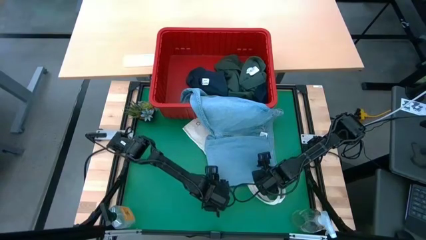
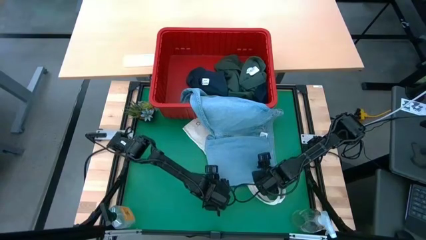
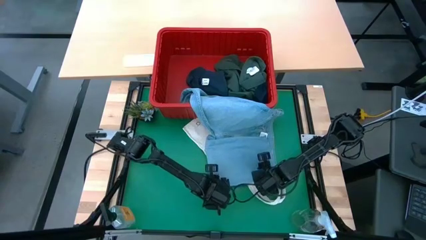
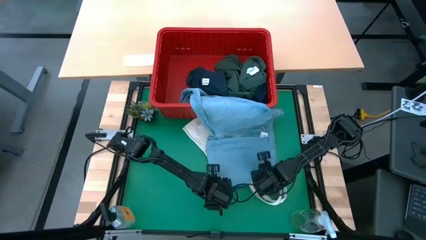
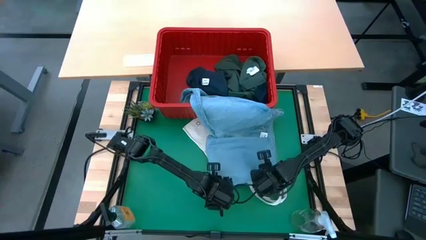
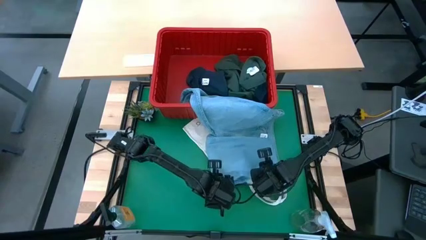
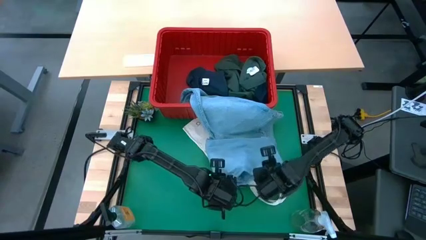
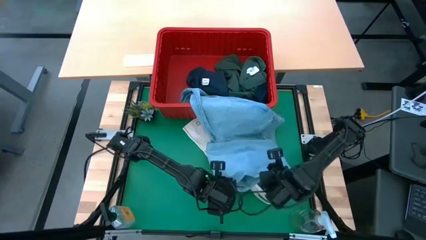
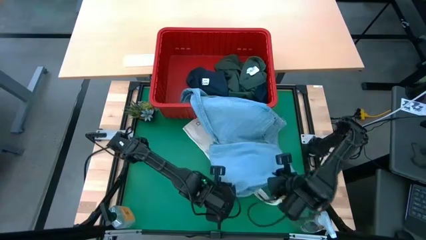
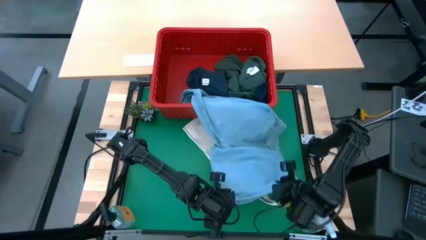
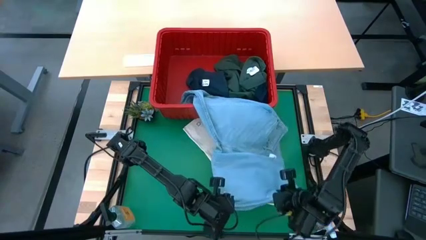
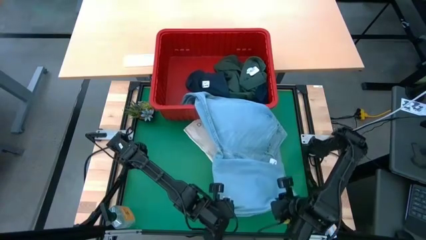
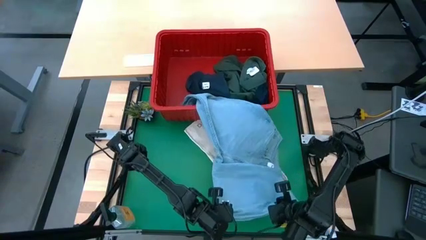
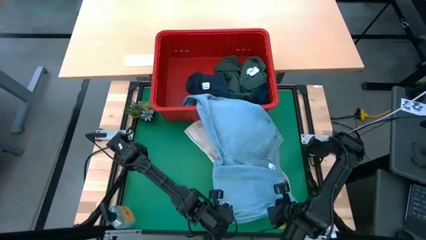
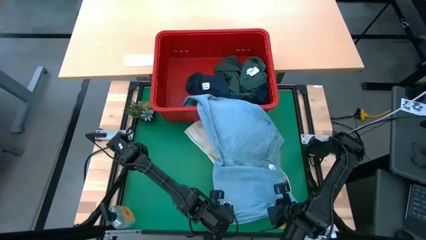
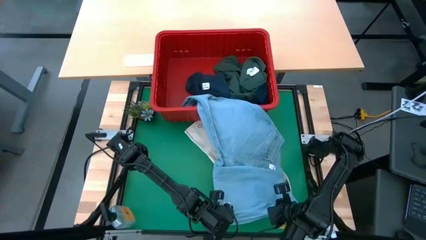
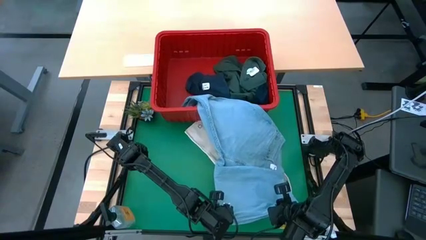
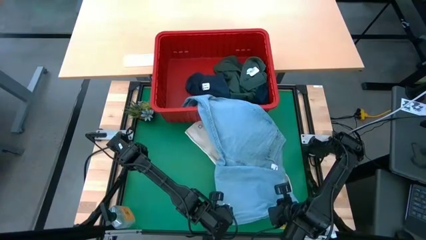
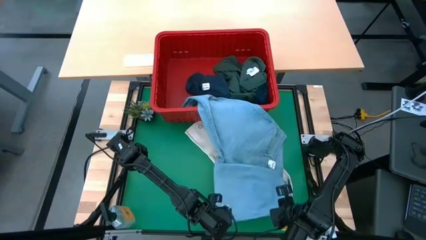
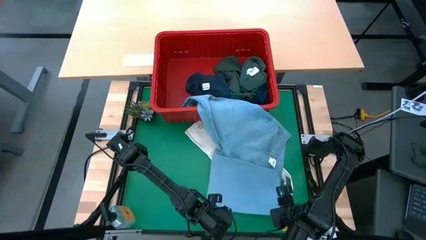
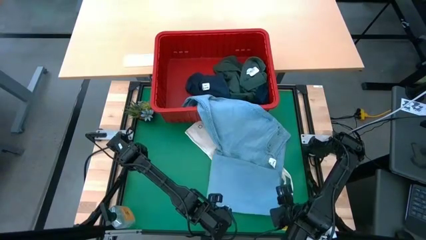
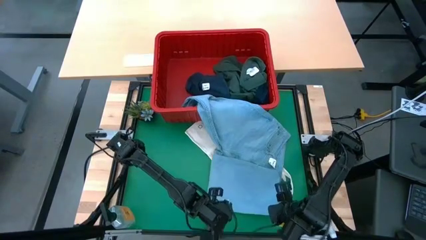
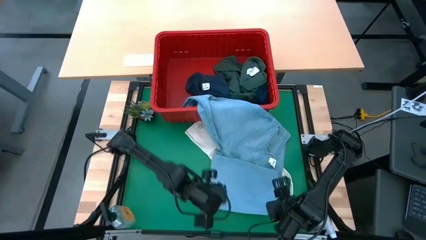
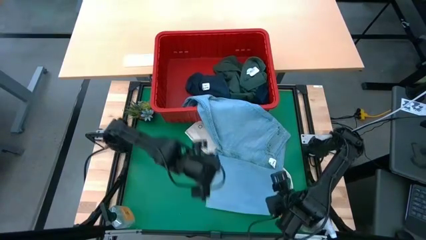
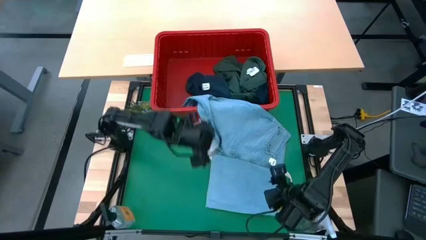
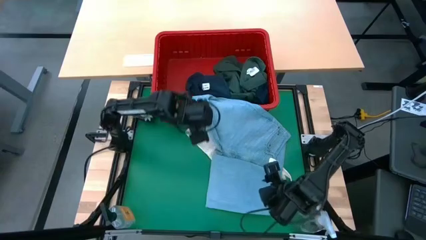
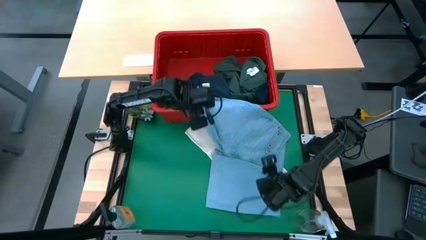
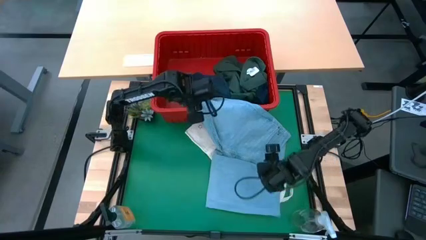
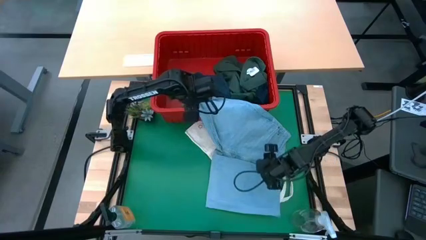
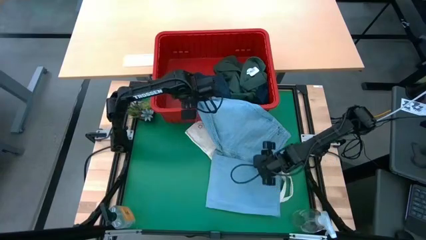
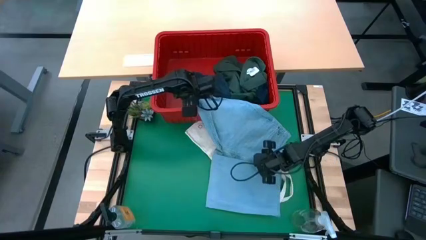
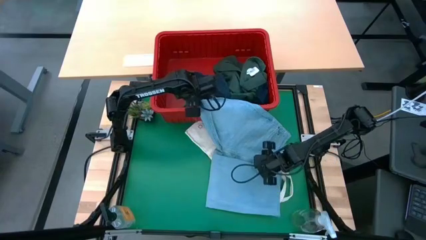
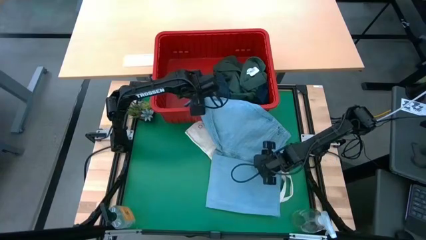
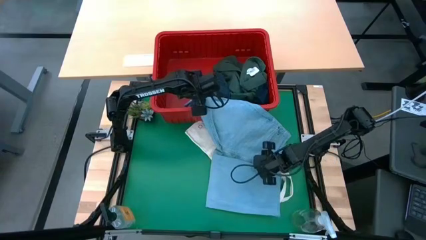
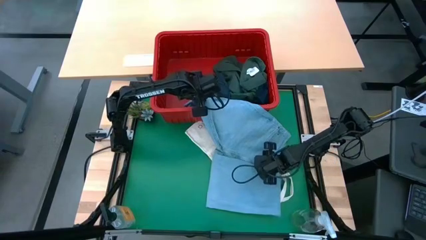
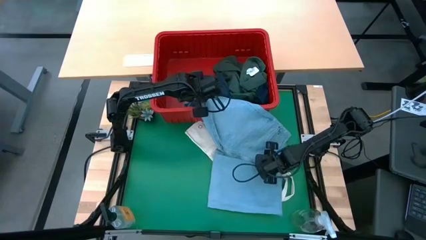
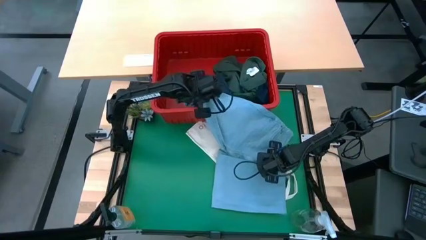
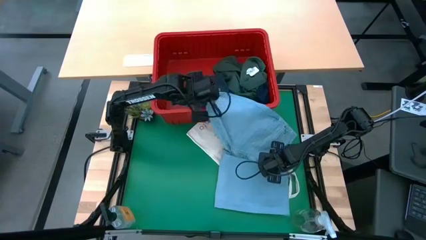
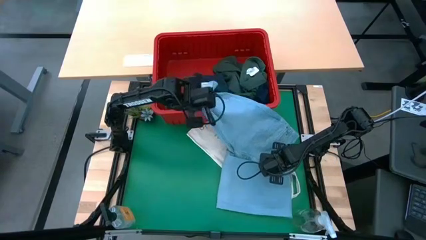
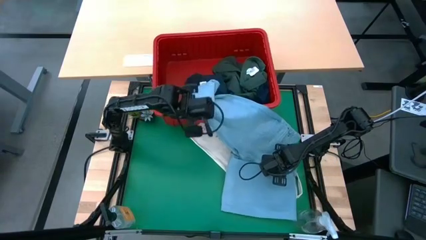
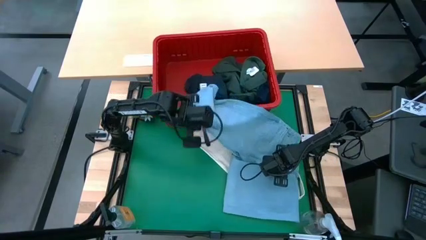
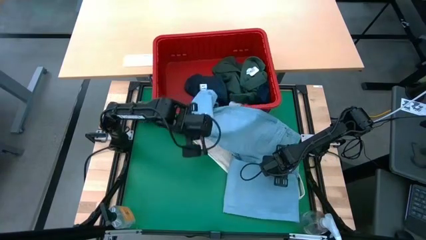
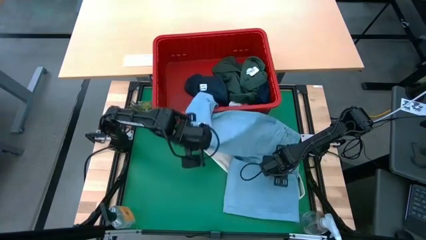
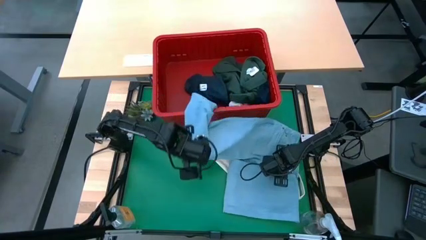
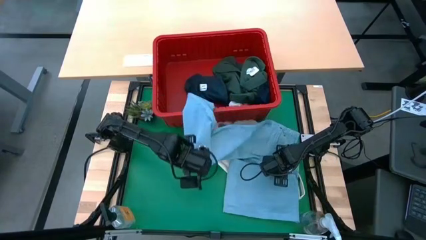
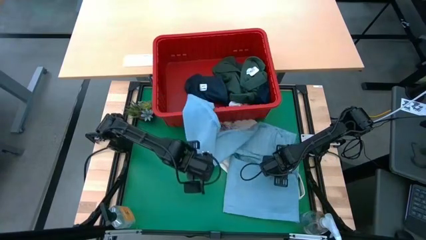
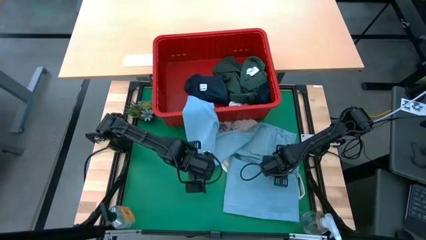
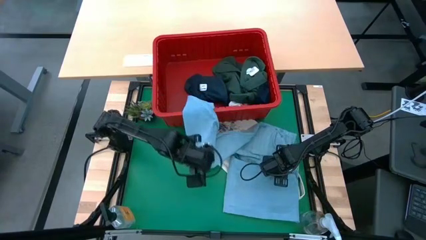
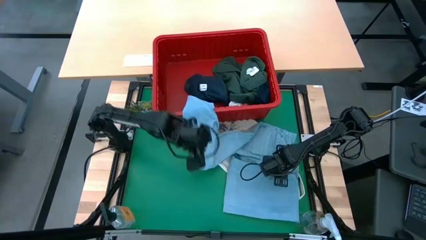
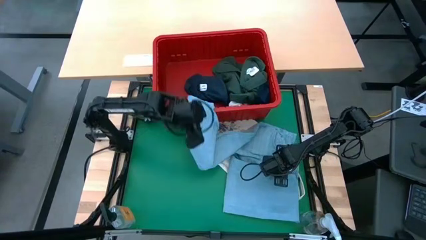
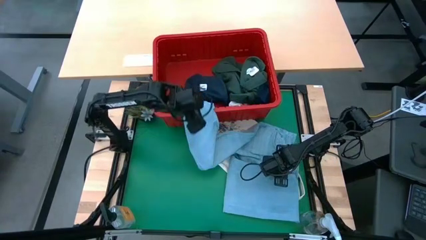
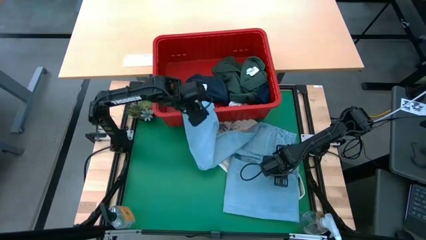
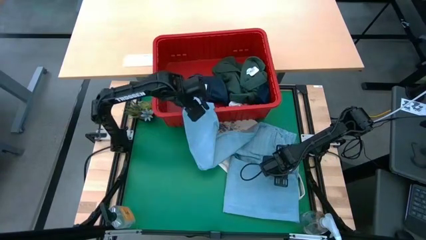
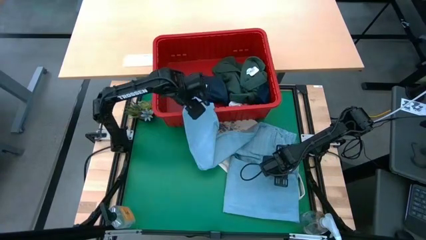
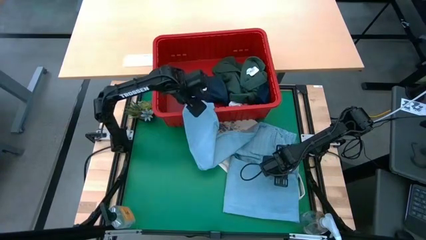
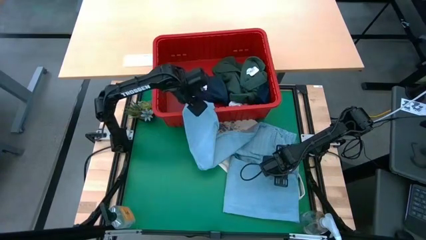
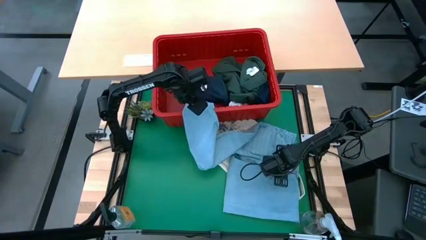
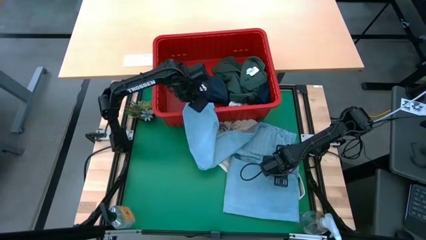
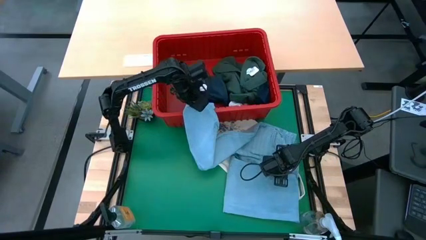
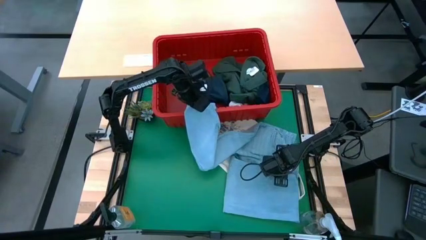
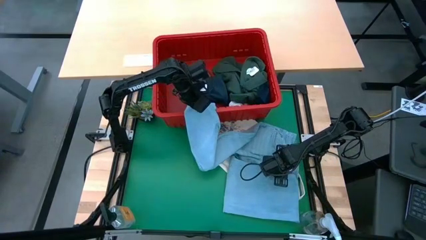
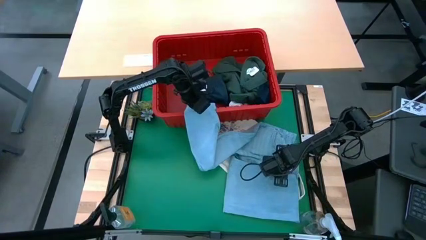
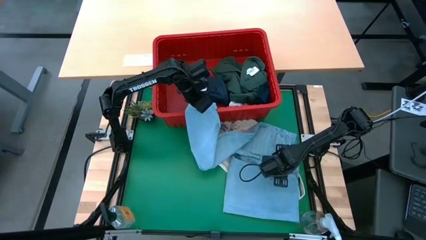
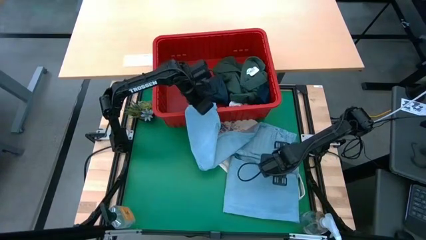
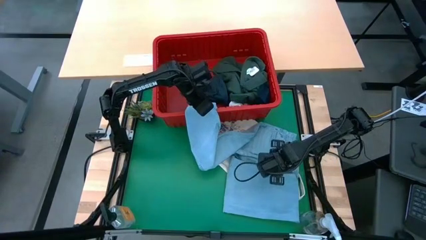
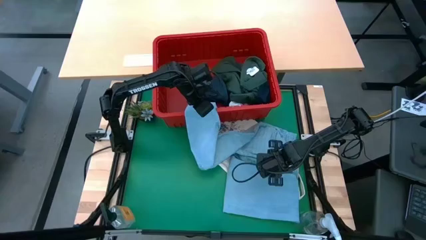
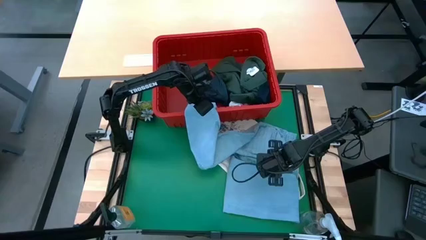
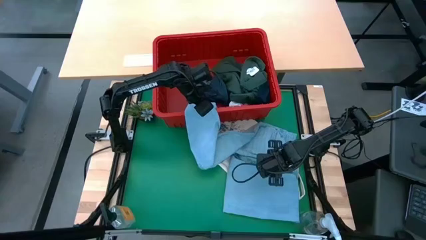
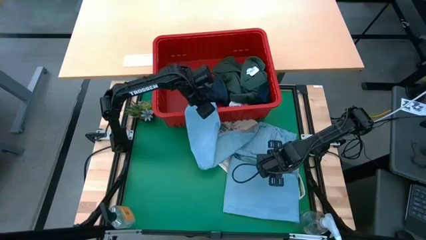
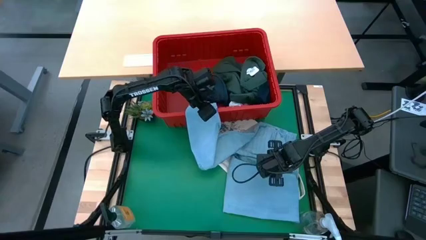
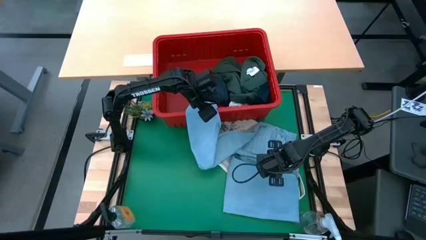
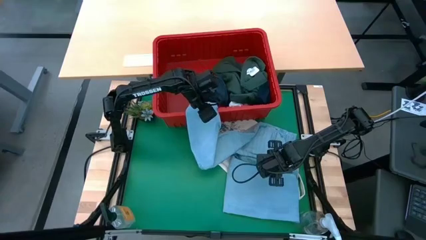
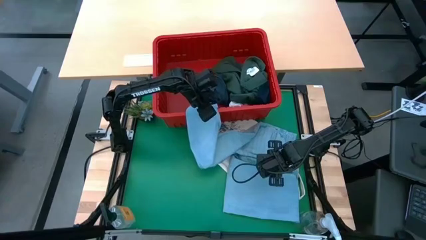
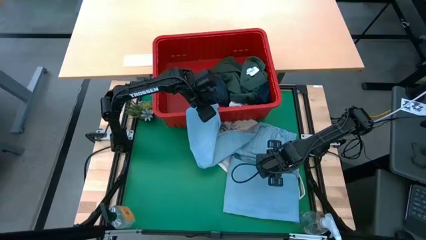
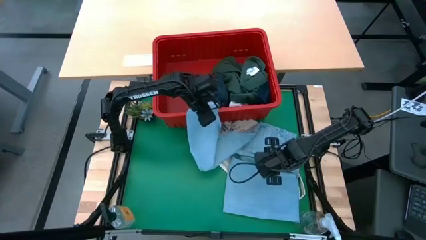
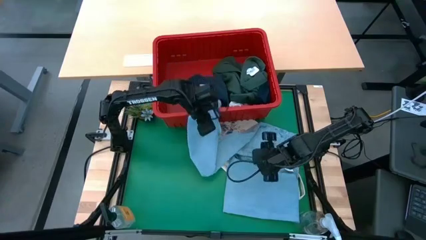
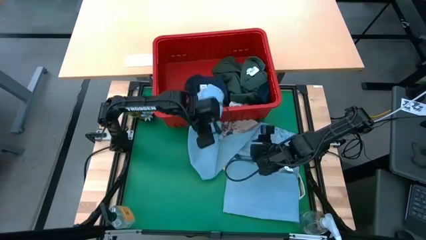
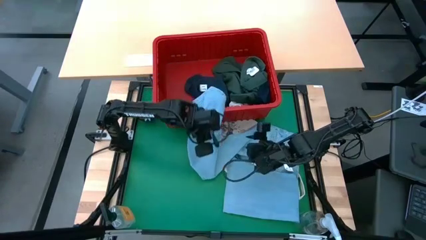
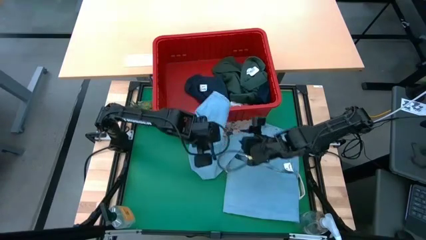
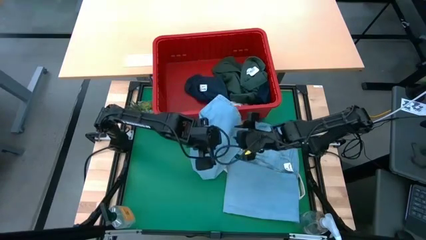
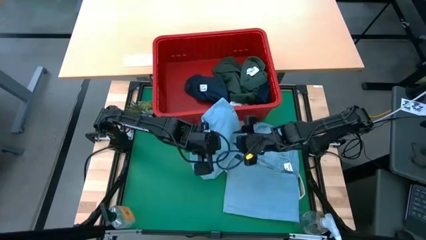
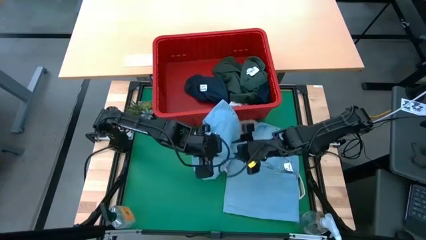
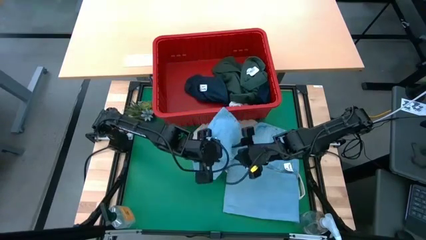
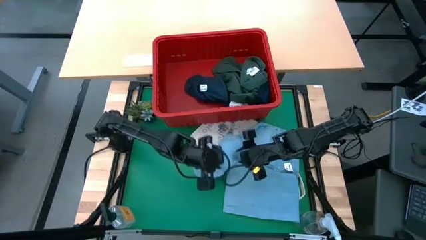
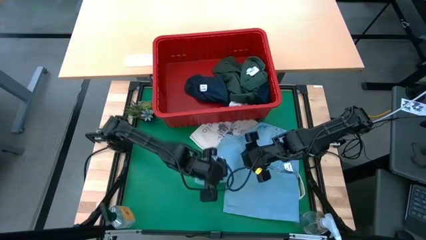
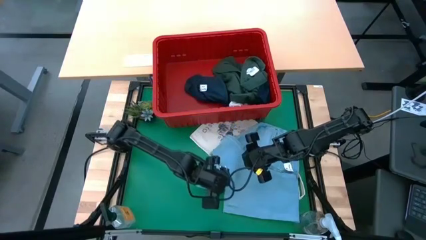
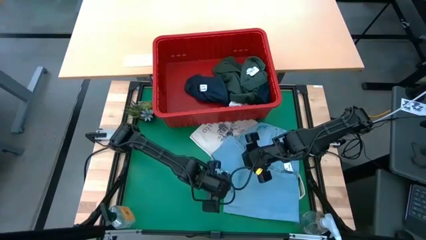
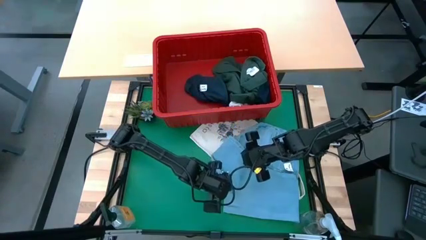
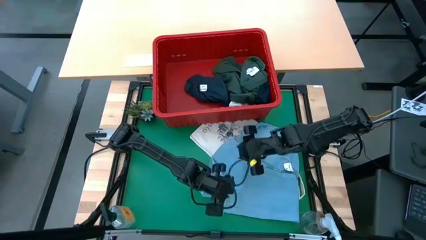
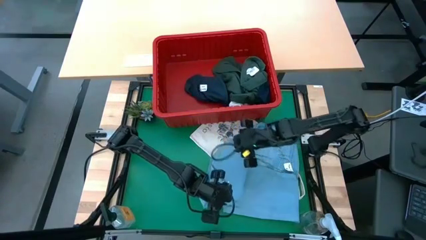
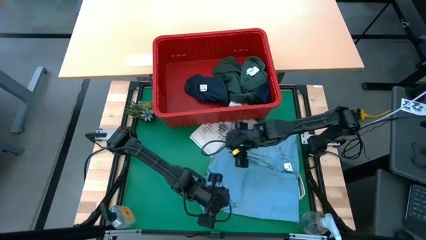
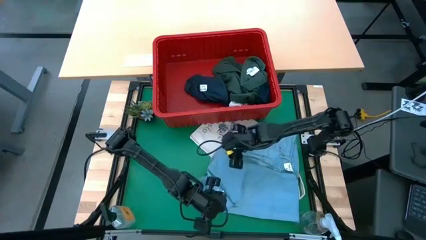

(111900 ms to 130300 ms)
Task: Fold laundry
Fold the light blue pants
